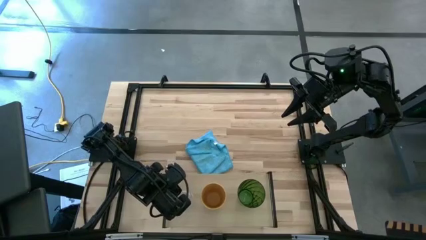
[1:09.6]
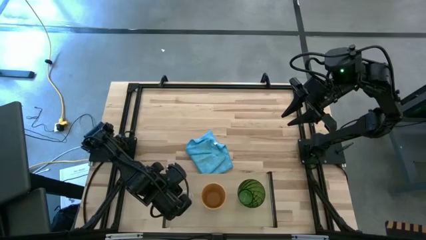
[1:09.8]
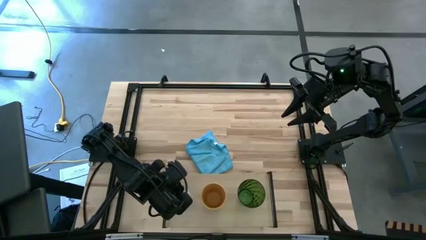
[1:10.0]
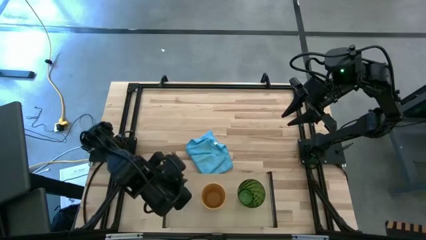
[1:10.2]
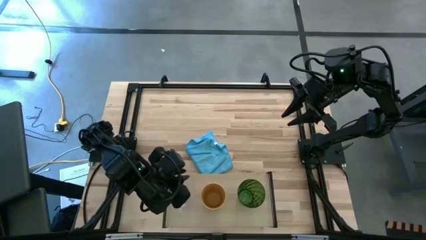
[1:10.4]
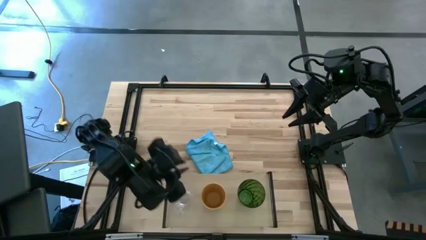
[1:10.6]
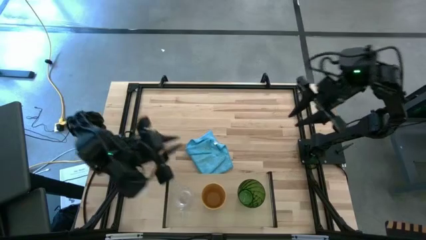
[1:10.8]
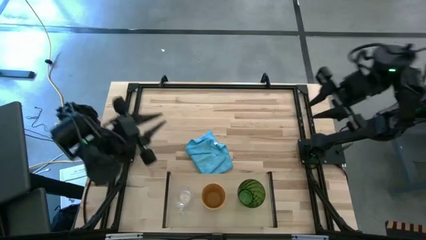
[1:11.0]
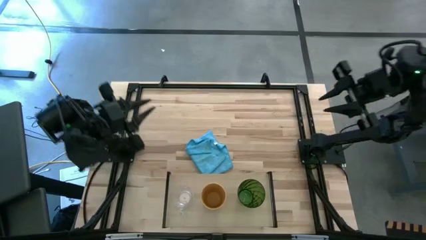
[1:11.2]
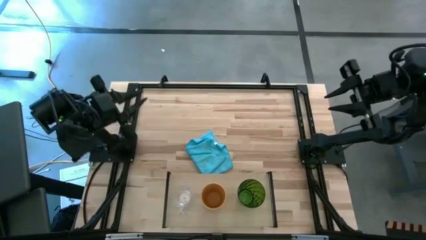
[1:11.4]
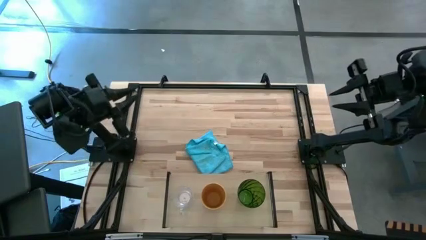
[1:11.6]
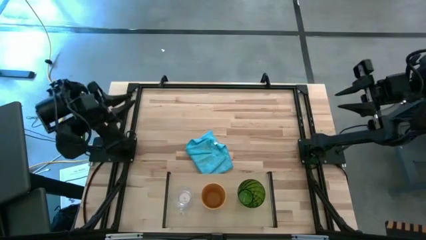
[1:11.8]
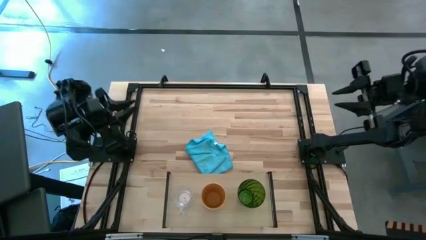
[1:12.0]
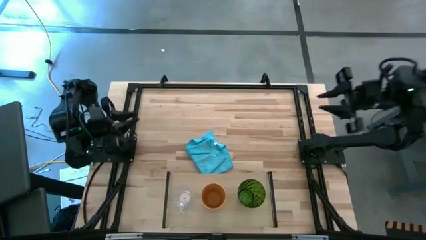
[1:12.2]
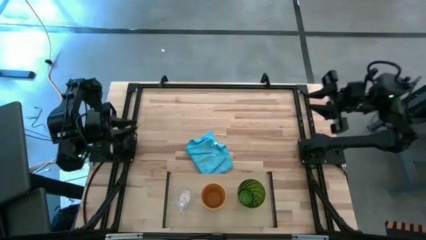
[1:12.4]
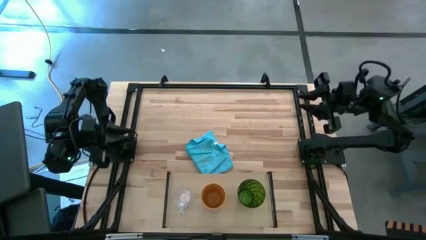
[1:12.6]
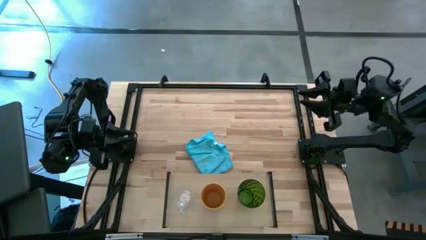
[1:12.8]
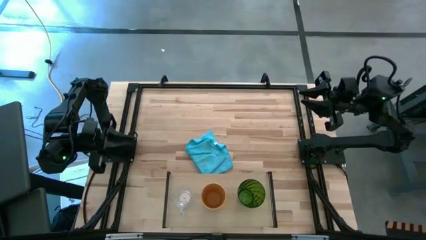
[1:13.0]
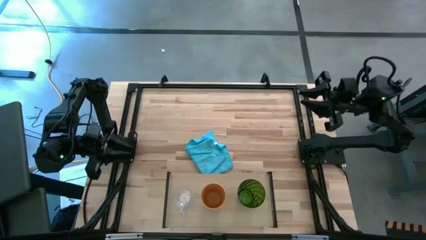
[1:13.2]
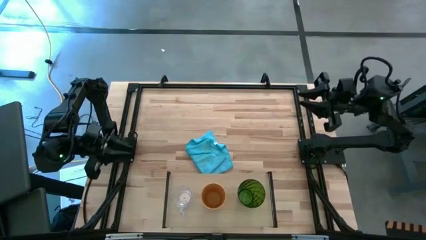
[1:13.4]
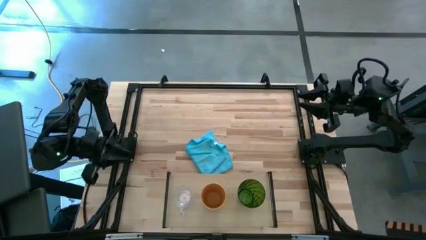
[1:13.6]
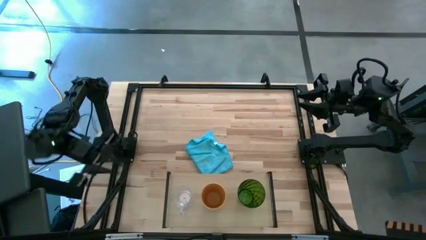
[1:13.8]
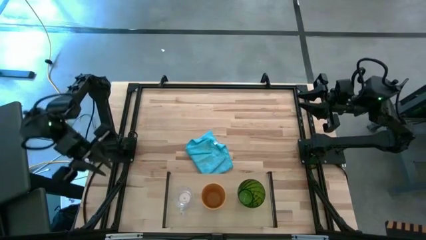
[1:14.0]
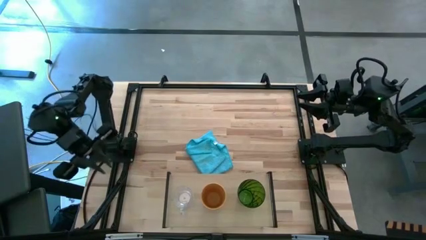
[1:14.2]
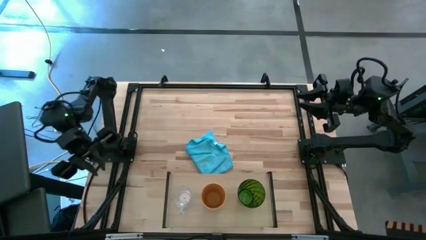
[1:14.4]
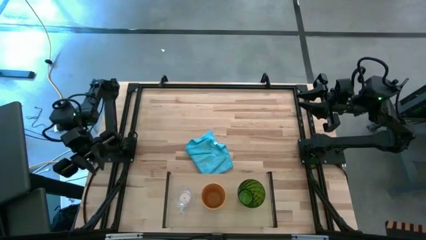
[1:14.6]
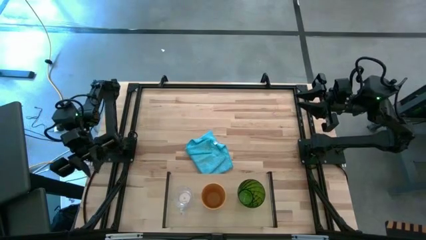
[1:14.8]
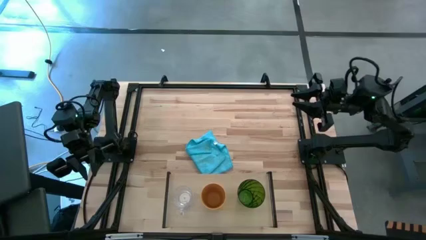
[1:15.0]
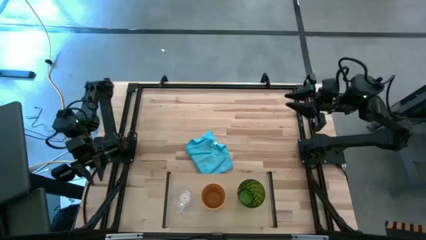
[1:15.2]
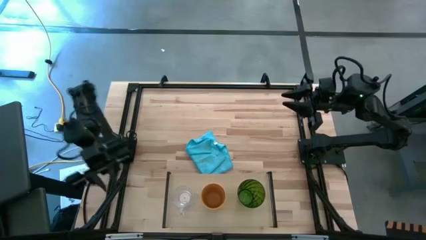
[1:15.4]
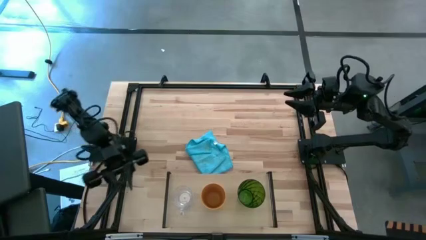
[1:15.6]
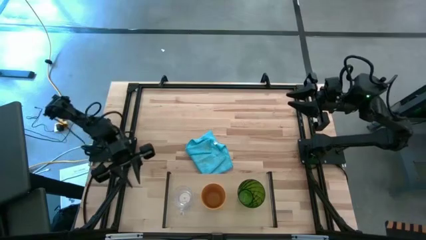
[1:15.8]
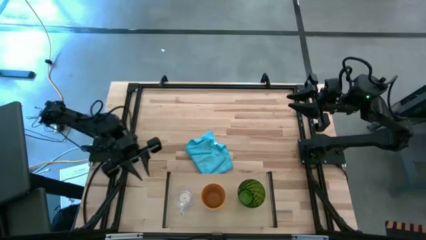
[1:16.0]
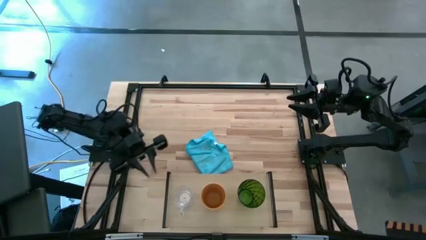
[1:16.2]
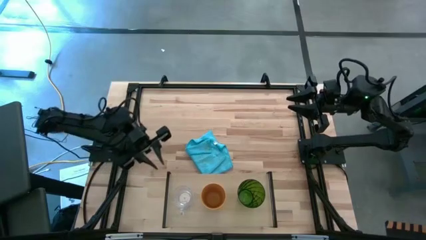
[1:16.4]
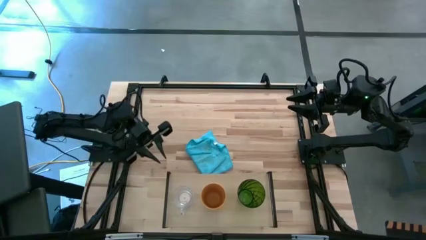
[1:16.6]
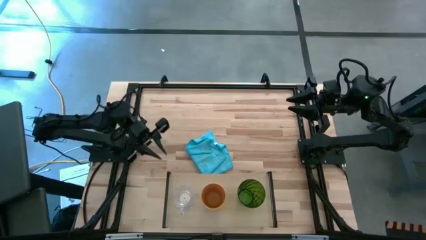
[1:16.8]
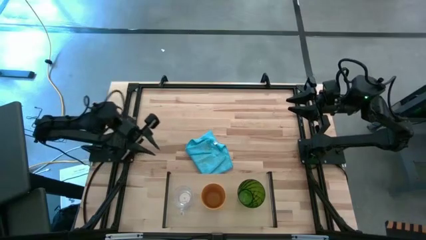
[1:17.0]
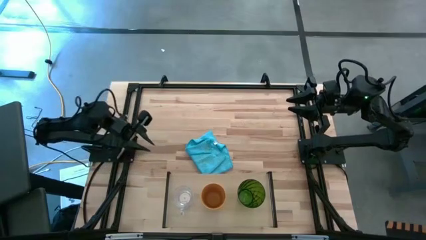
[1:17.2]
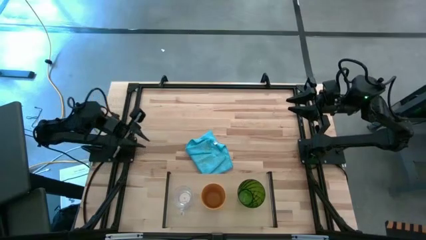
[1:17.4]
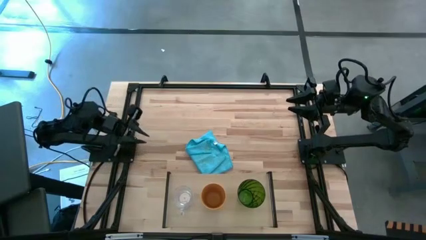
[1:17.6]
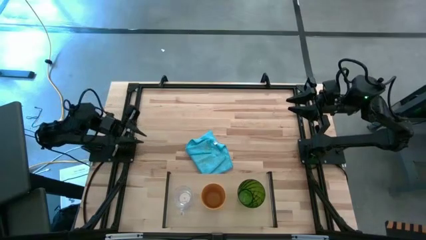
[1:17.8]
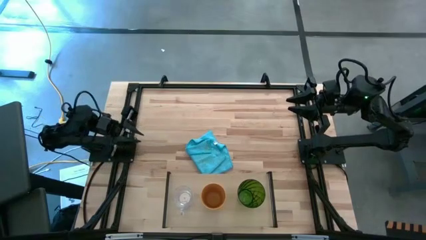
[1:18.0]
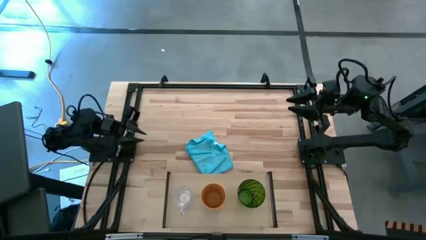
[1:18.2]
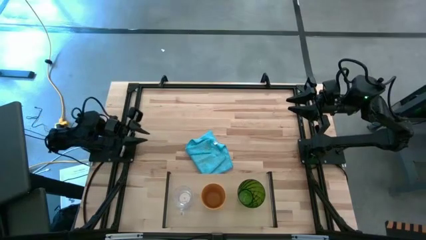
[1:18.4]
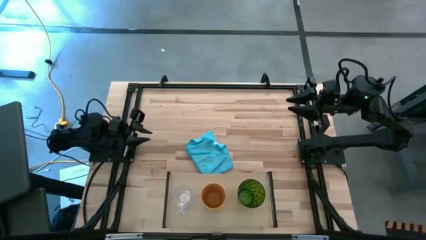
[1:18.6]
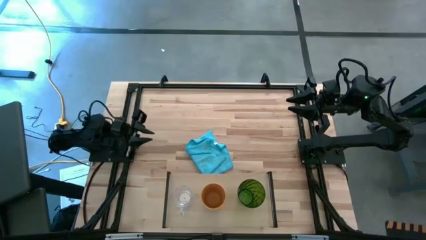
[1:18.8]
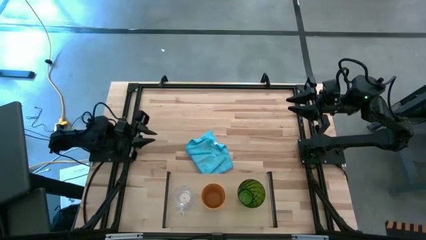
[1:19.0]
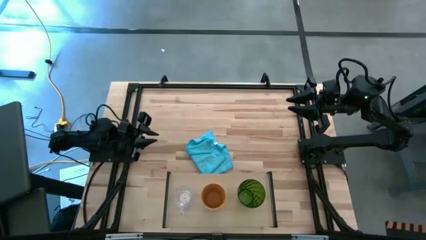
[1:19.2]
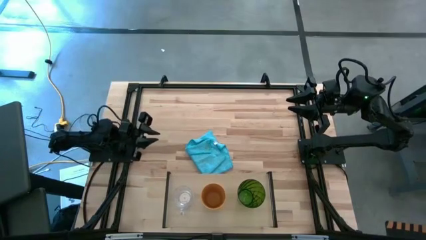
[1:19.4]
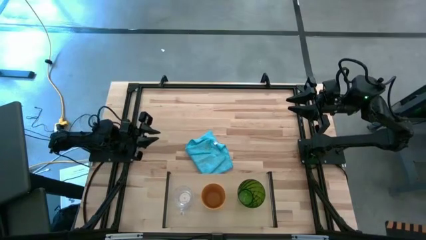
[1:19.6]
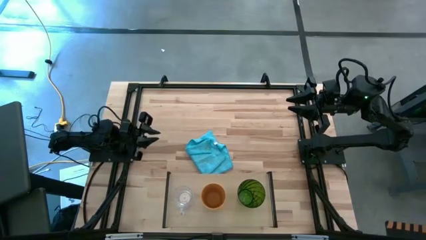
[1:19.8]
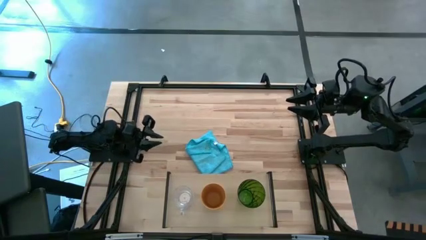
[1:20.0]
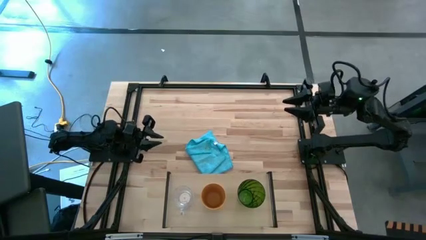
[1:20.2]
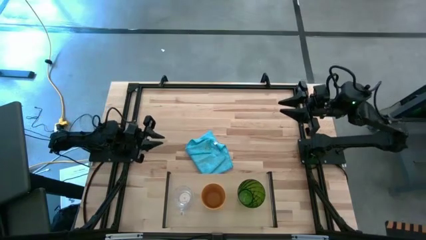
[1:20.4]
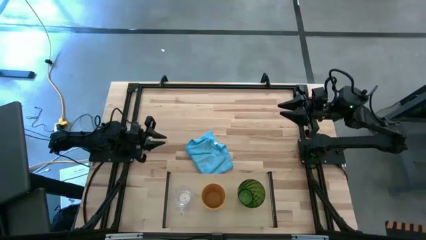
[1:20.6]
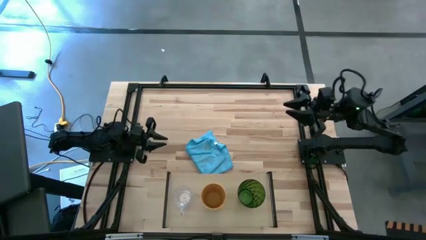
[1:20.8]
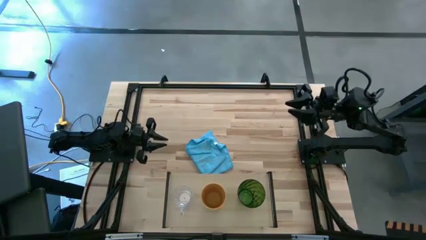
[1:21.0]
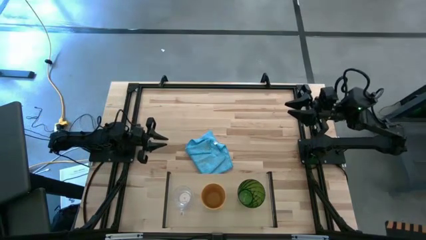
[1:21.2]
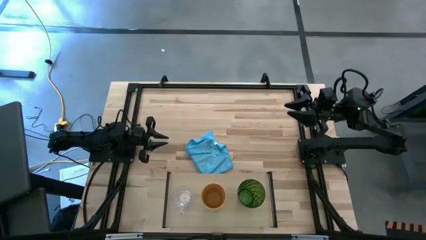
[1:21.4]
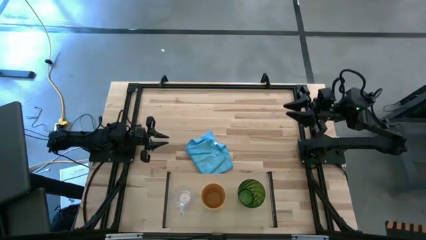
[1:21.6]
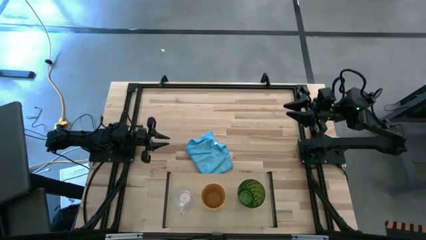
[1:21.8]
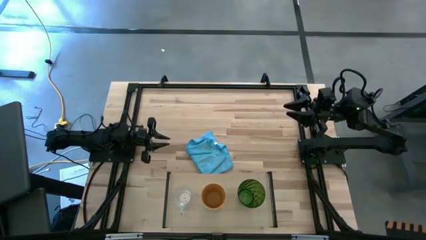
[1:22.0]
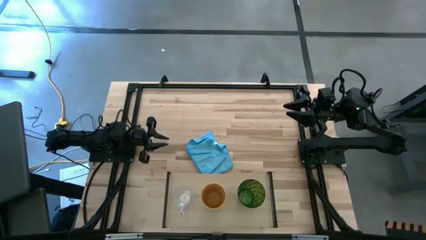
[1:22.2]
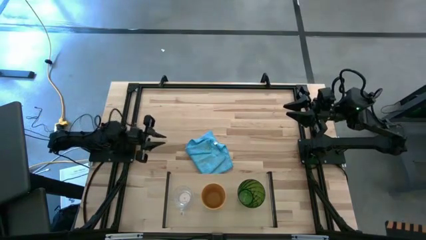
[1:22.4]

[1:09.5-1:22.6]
Task: Stack small to large cups/mugs on shelf
Return to Home Position

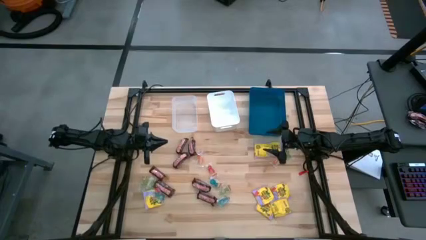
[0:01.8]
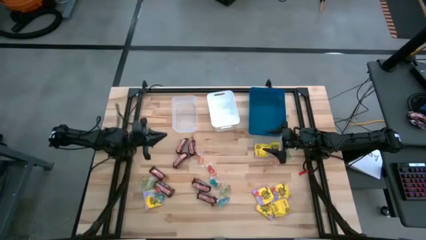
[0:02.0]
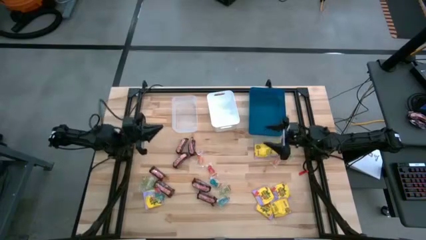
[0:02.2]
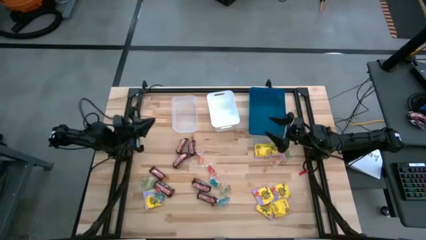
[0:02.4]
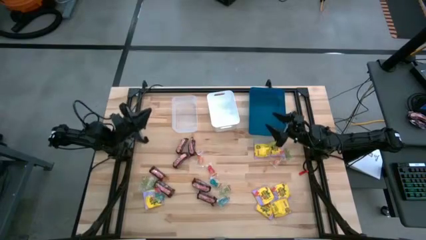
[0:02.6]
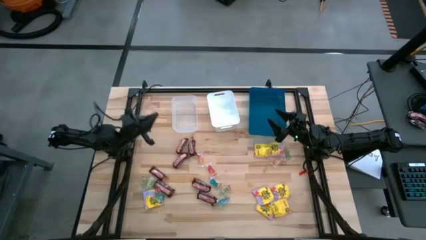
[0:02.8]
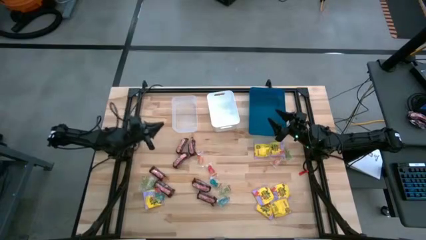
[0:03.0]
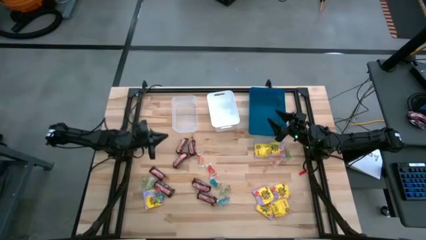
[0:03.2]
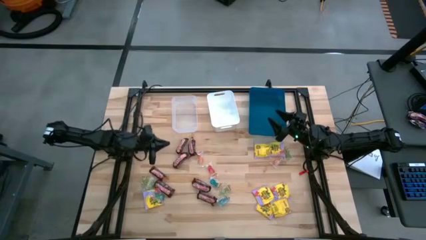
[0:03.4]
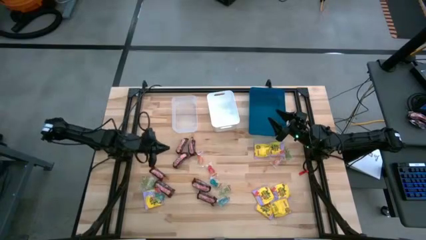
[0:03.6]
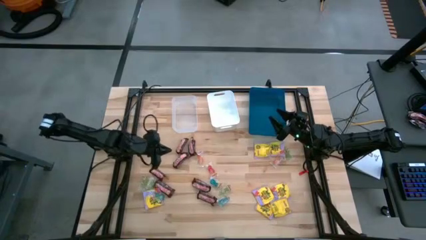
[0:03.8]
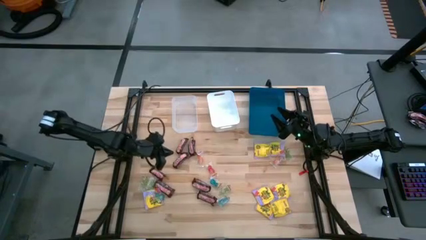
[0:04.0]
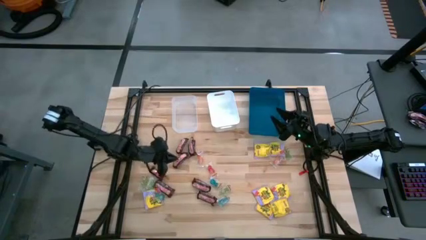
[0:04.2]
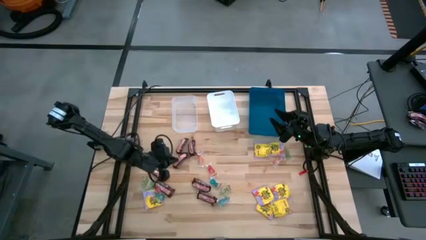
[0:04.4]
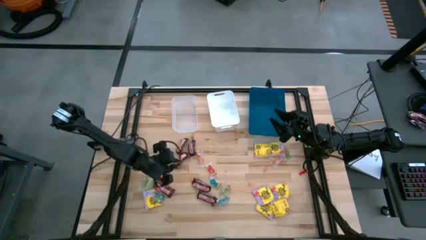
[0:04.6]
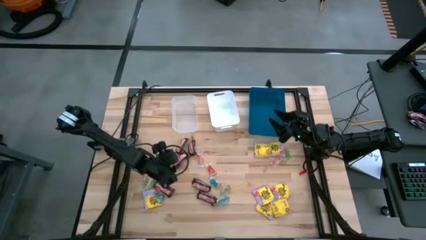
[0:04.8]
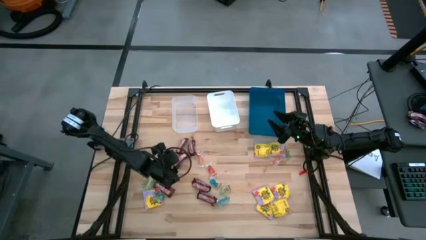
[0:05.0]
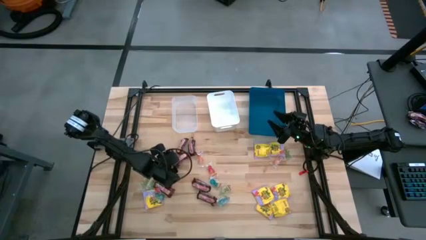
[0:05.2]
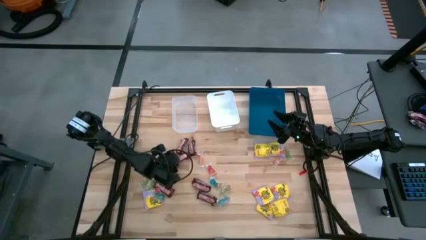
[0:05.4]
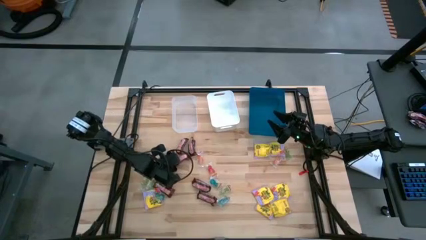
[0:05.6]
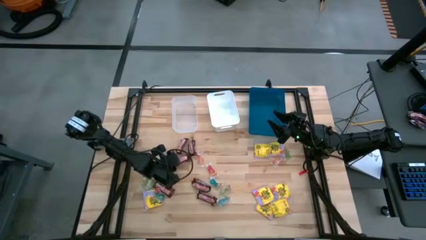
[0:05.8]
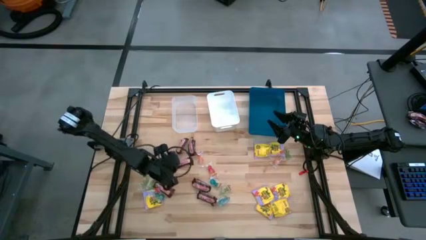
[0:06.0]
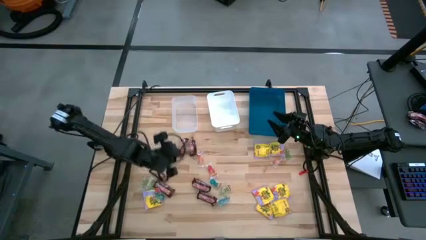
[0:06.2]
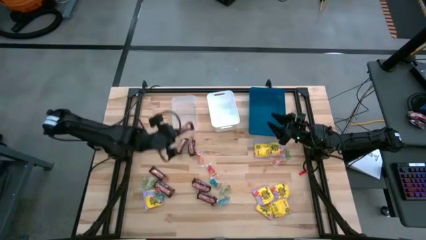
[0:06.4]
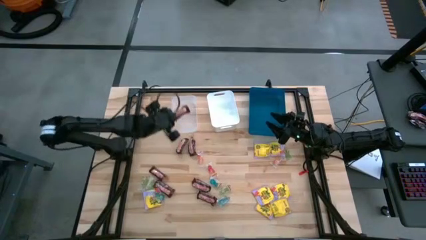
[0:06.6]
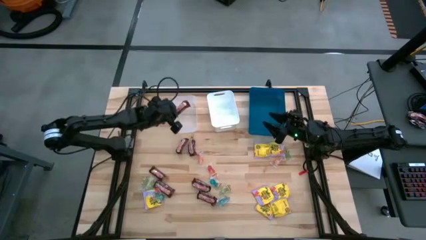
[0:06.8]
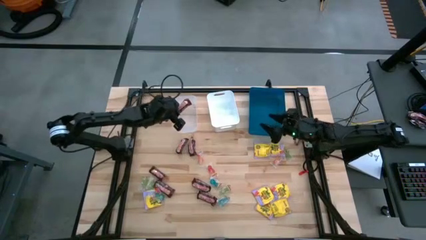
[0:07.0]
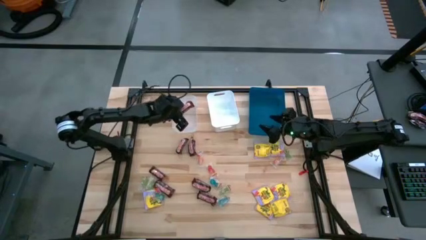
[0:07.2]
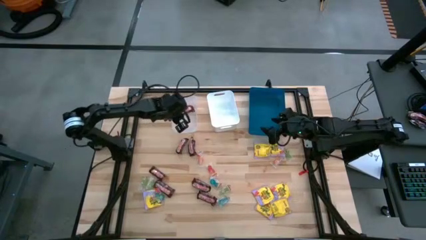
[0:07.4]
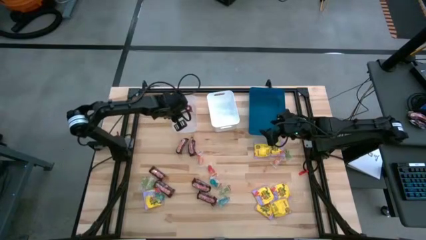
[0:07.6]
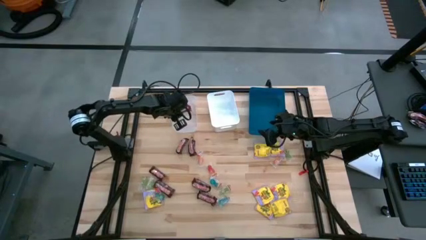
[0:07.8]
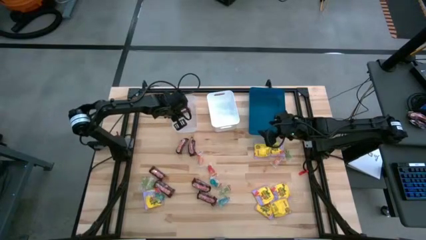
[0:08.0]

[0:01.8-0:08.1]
Task: Sort candy
Put the middle left brown candy bar into the transparent bin
